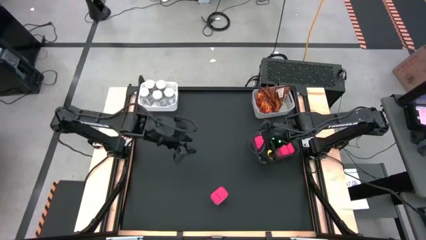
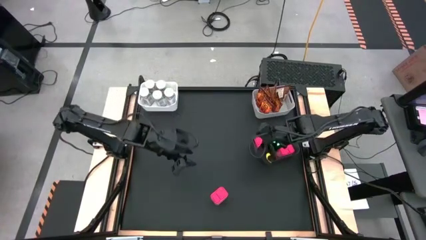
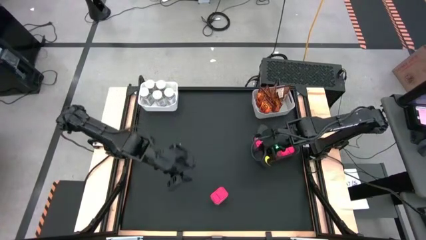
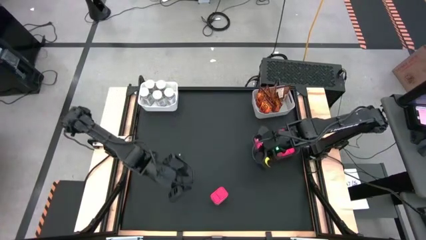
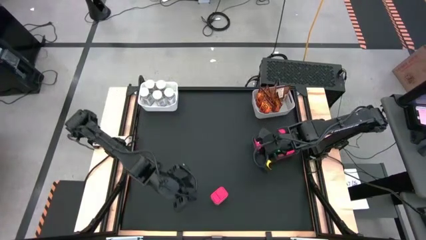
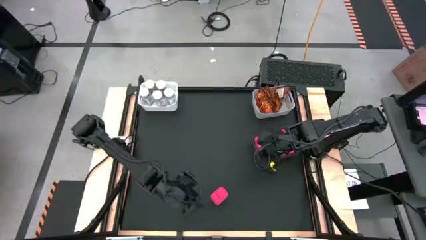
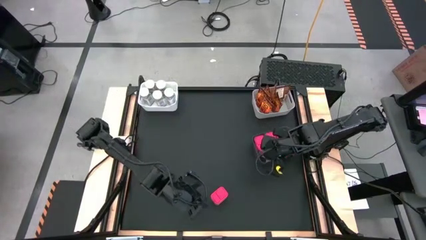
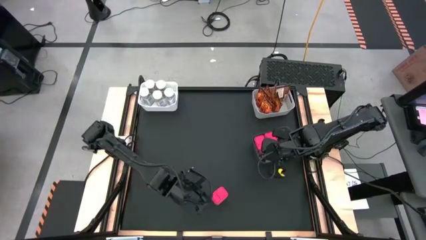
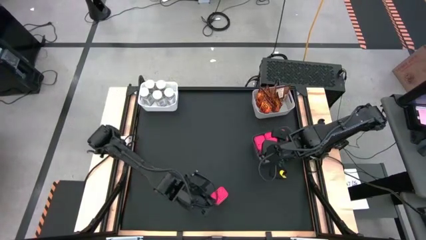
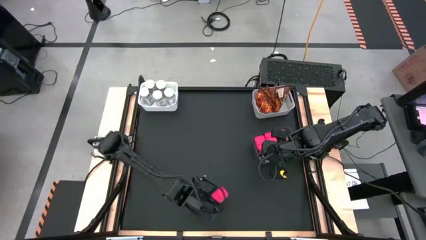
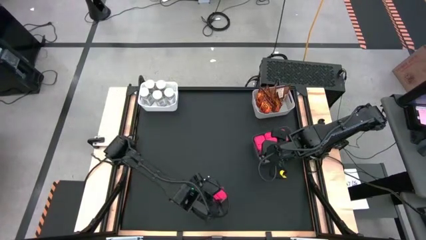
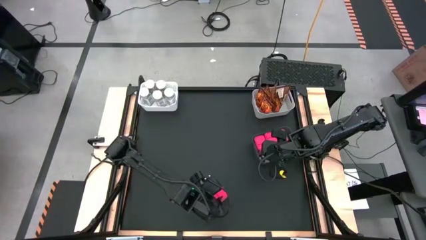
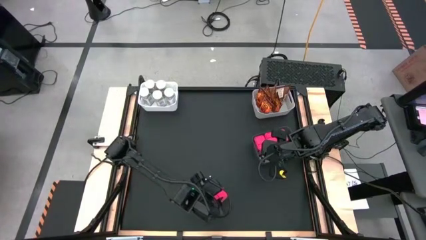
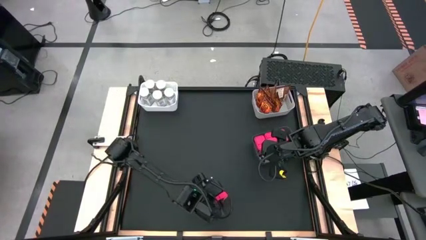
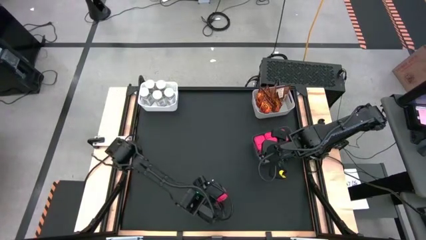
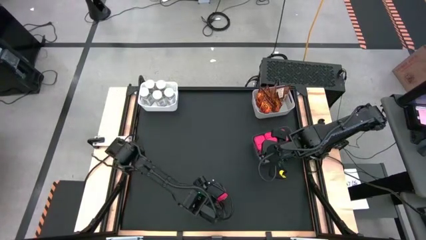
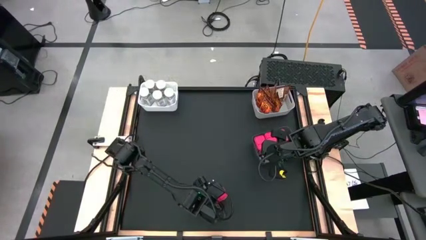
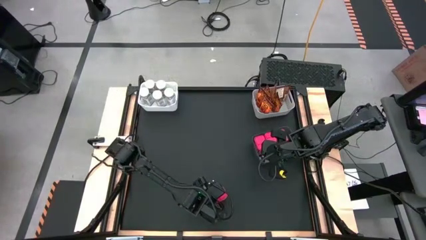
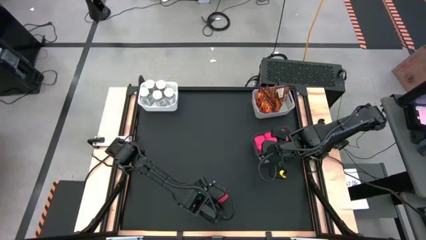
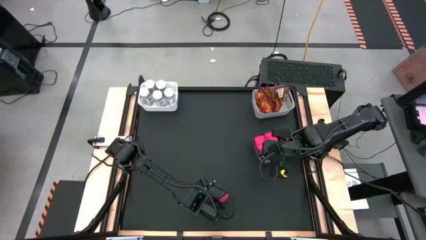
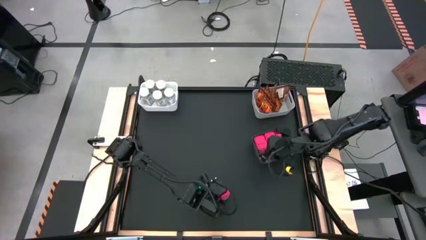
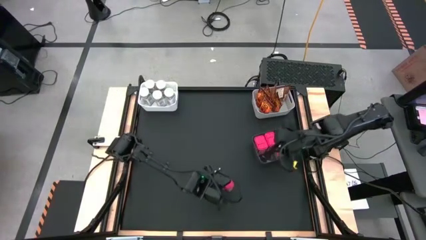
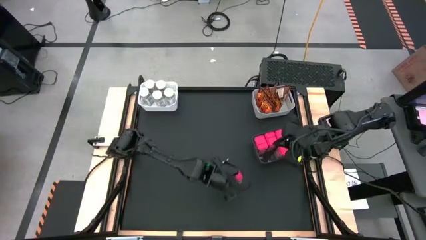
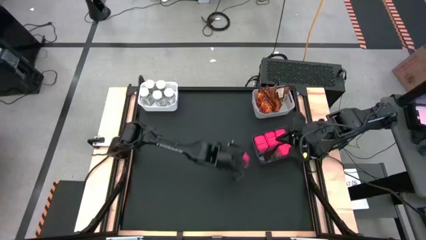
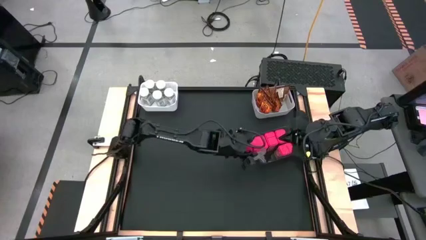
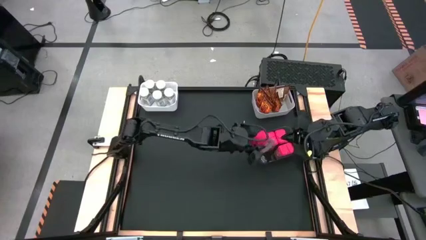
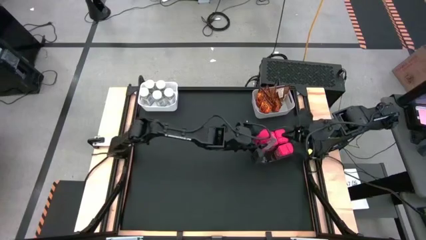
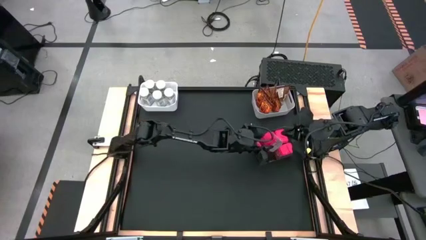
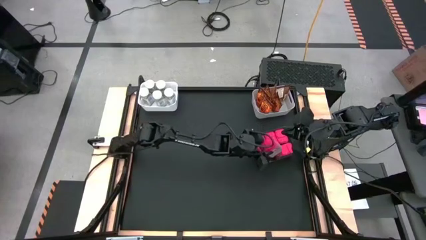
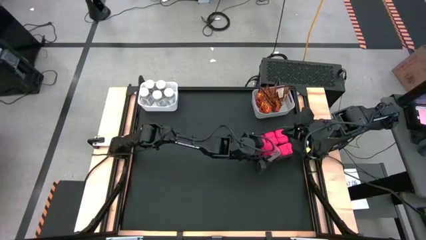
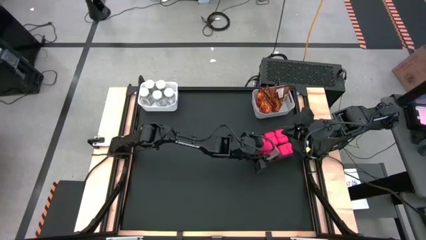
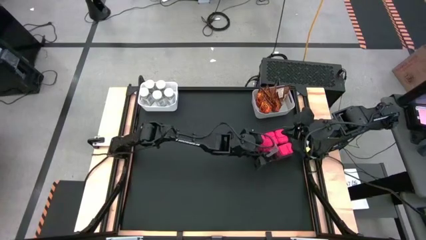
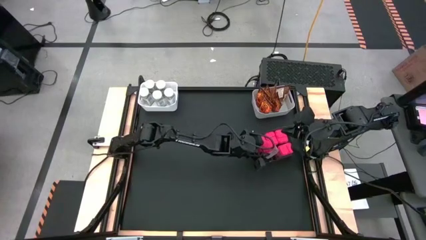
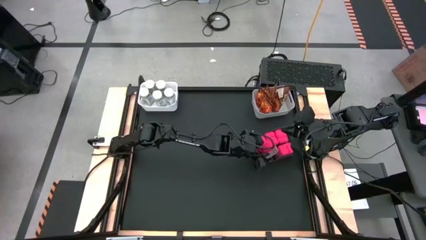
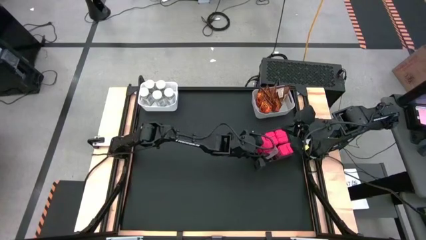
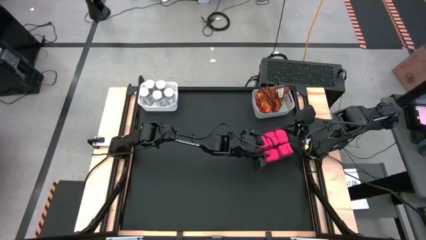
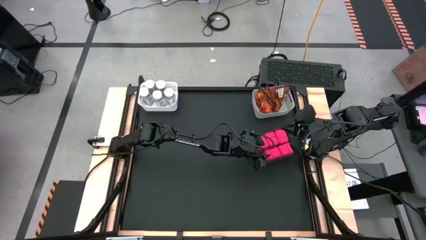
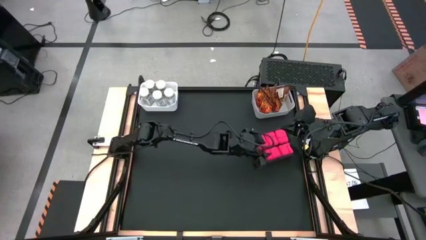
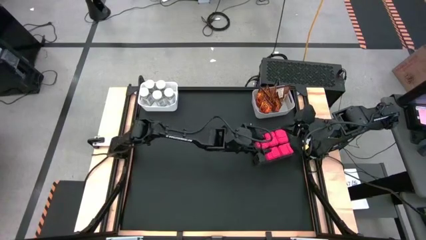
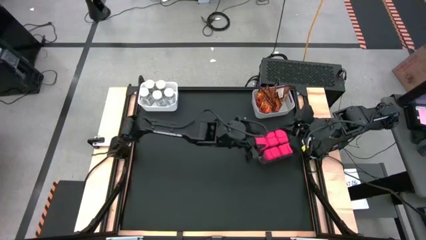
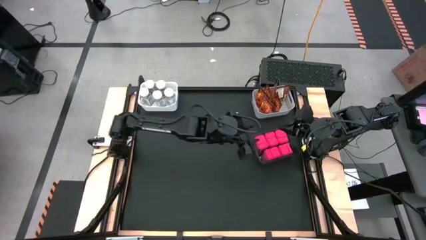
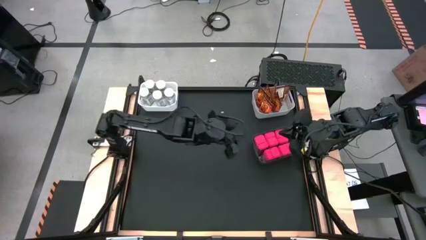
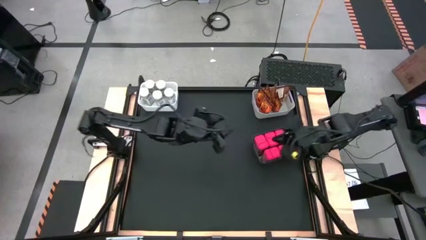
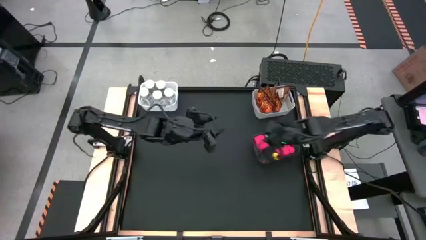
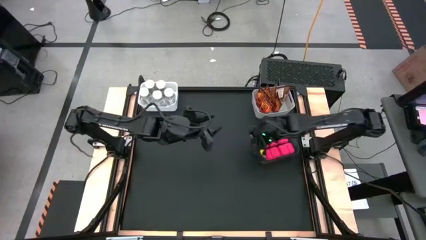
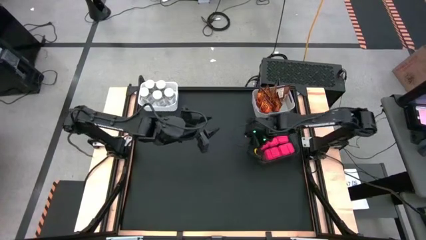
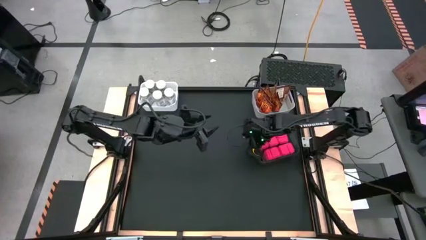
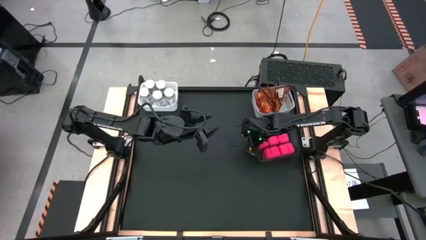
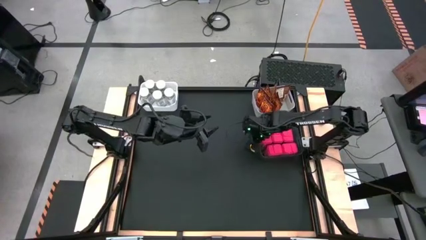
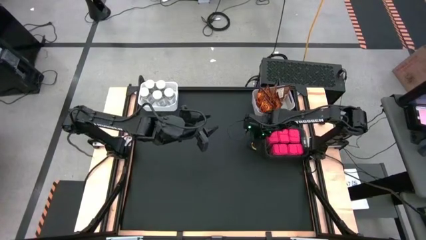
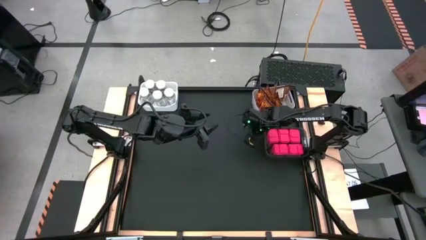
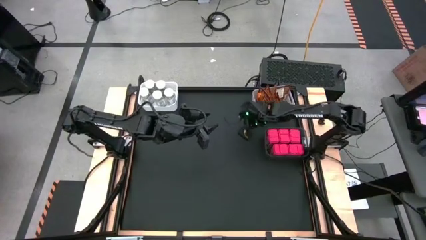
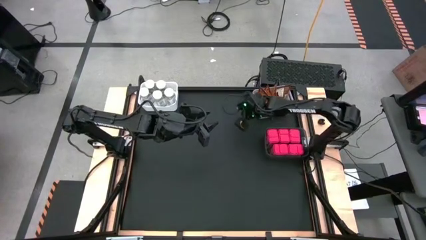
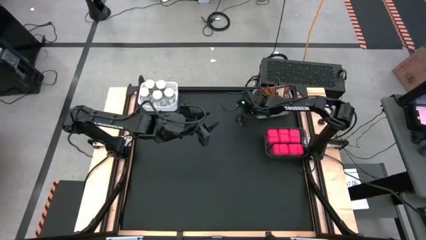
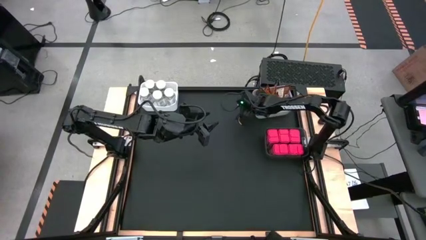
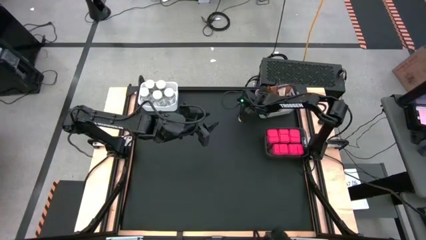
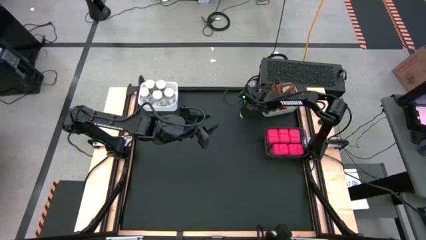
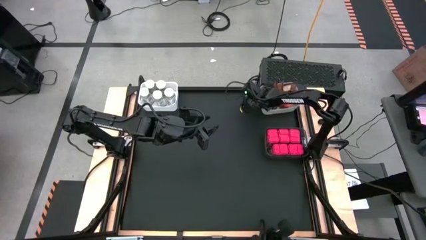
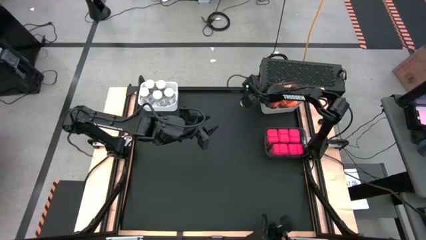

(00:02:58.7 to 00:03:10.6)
Task: Sort spices by type
Put the red seasoning can into the black transparent bin
